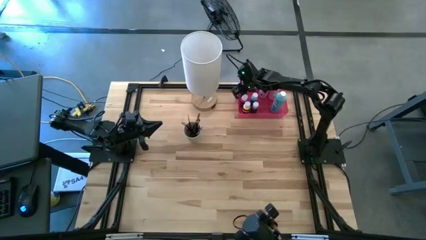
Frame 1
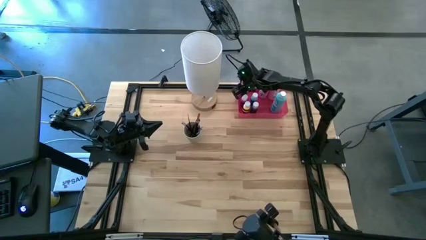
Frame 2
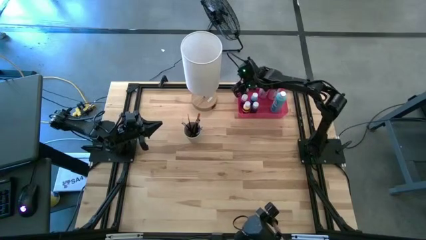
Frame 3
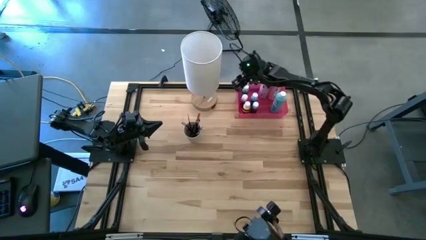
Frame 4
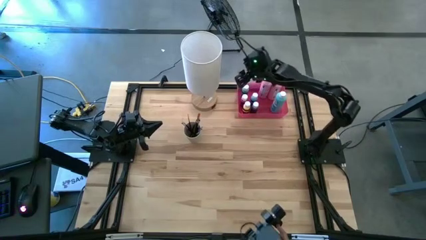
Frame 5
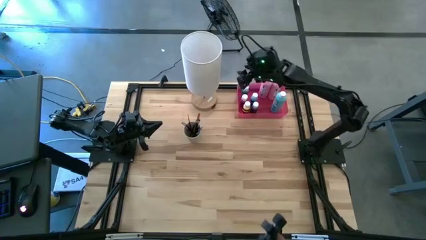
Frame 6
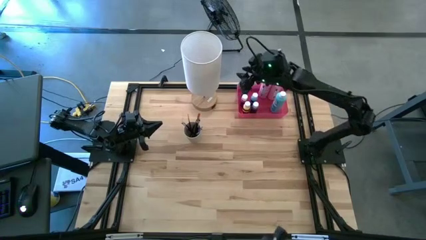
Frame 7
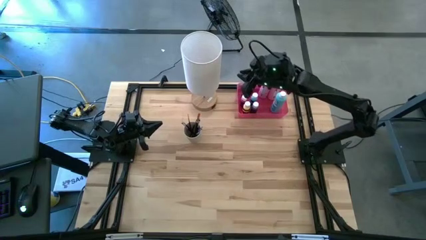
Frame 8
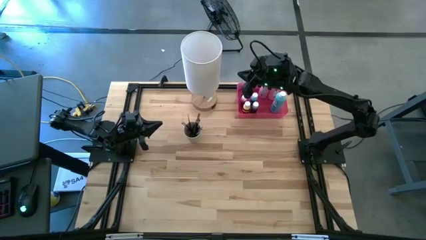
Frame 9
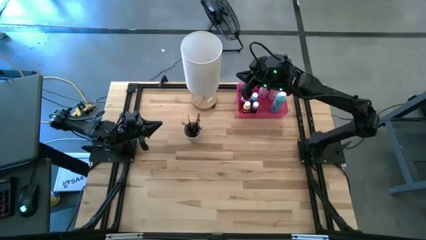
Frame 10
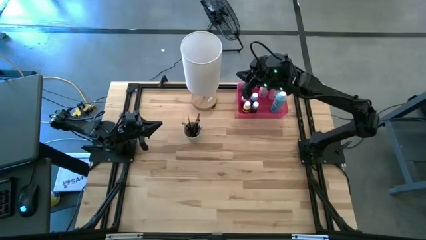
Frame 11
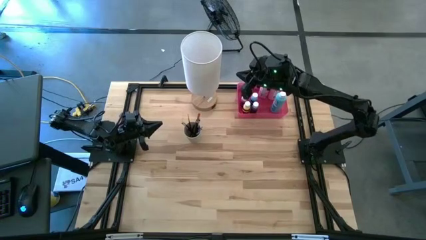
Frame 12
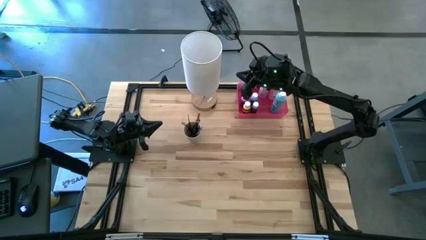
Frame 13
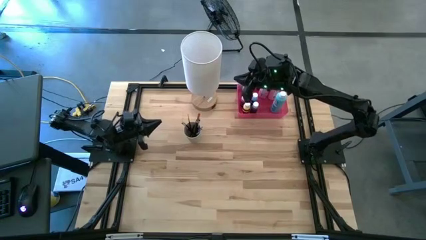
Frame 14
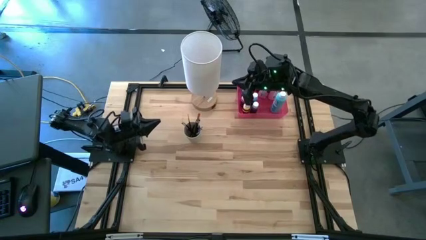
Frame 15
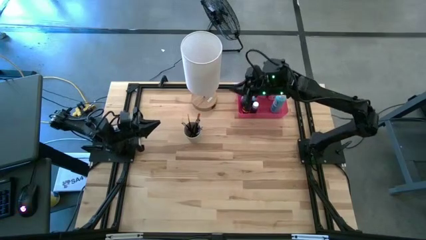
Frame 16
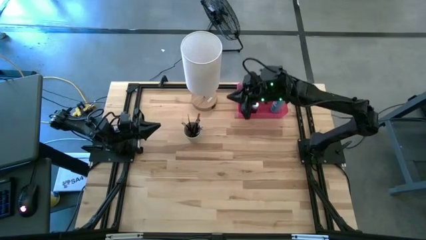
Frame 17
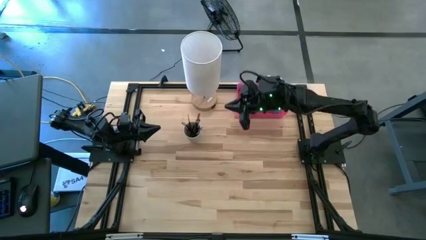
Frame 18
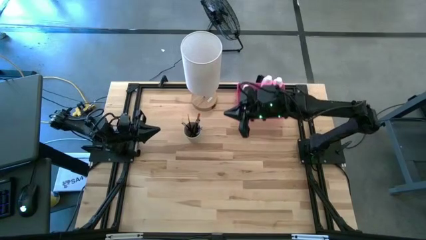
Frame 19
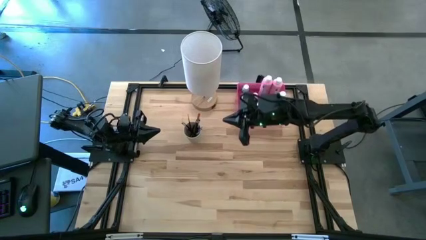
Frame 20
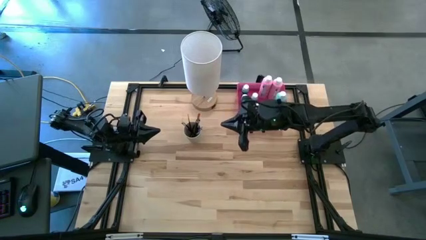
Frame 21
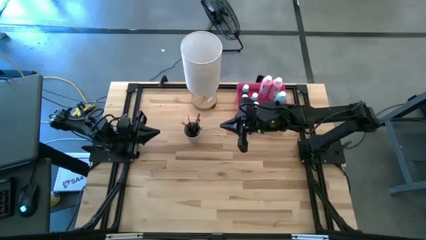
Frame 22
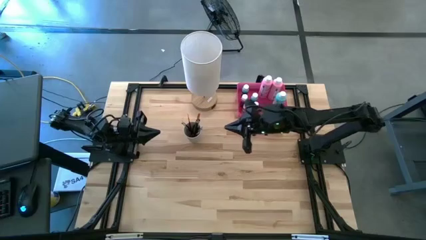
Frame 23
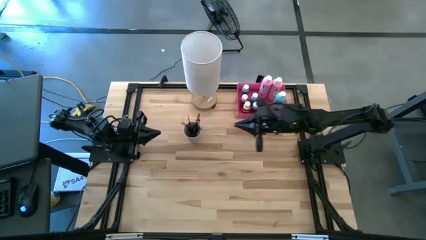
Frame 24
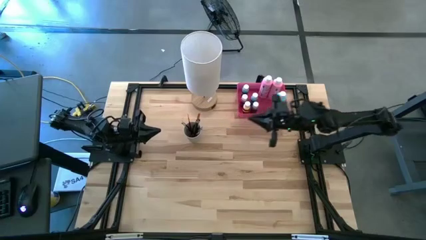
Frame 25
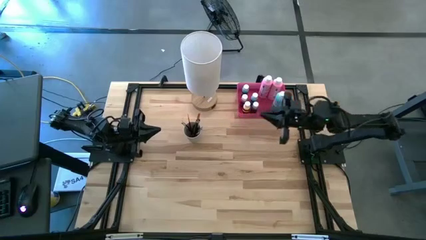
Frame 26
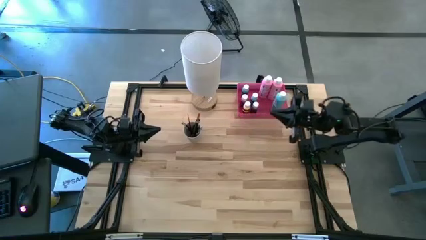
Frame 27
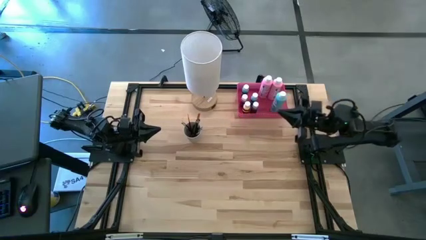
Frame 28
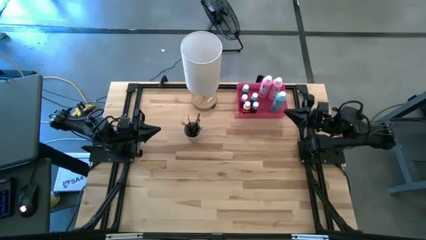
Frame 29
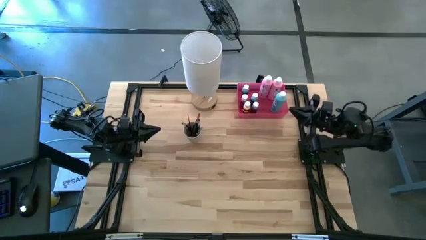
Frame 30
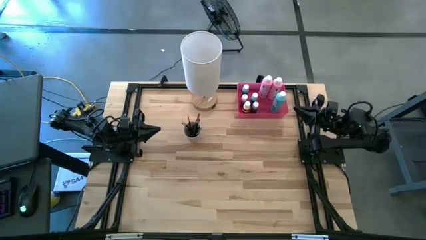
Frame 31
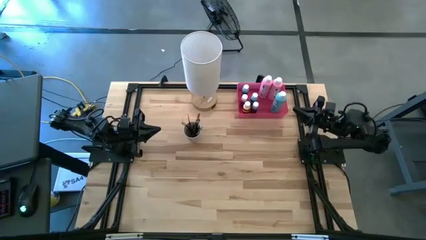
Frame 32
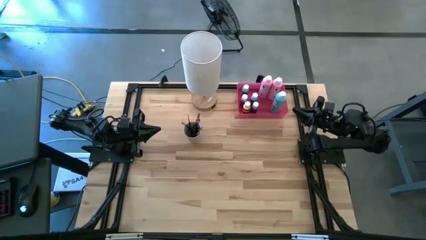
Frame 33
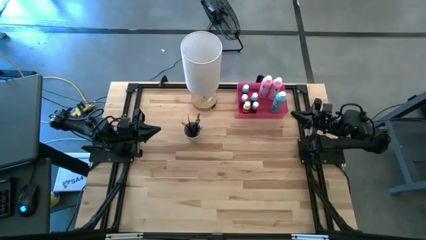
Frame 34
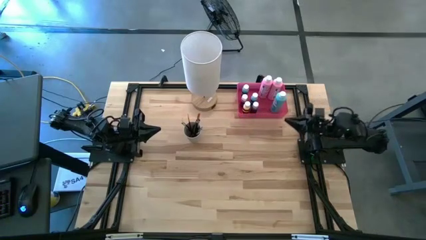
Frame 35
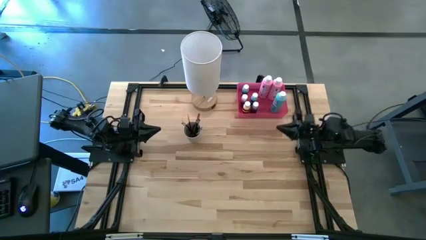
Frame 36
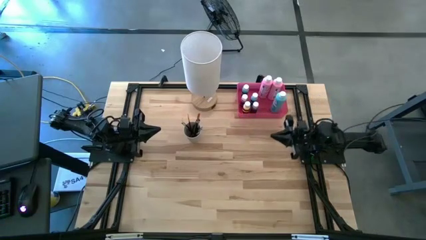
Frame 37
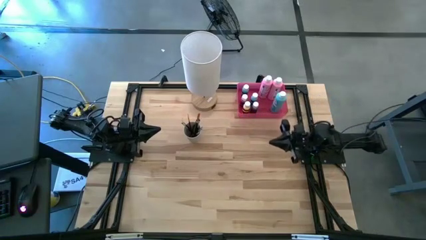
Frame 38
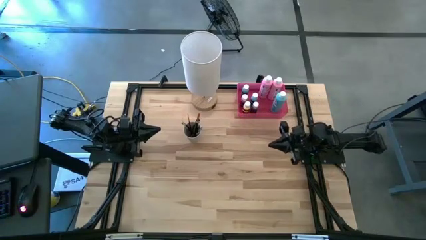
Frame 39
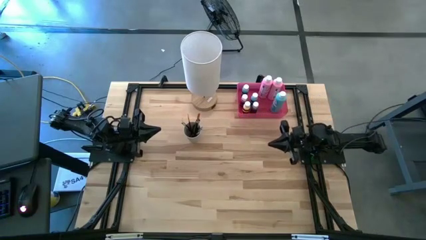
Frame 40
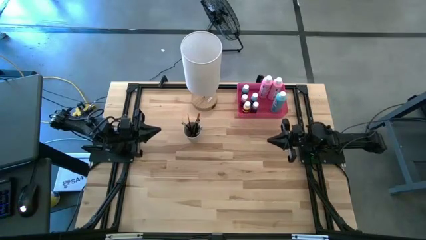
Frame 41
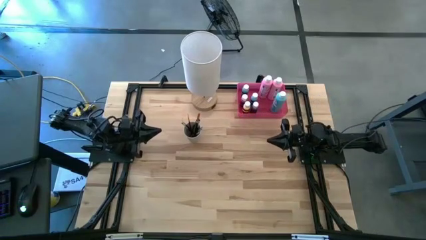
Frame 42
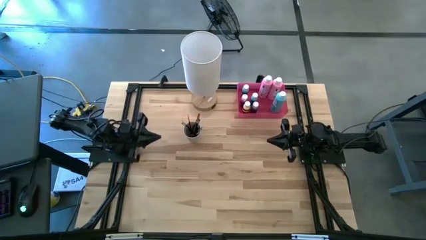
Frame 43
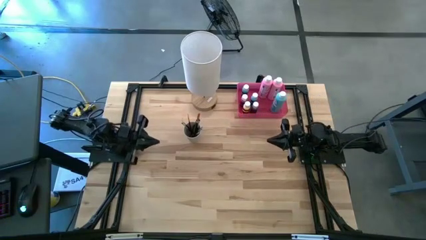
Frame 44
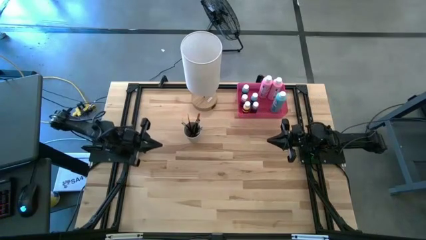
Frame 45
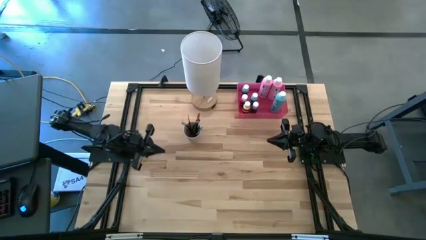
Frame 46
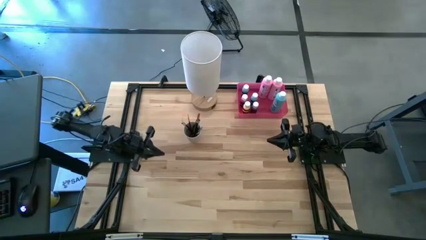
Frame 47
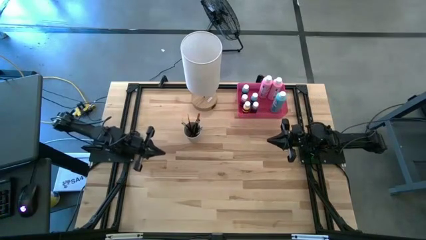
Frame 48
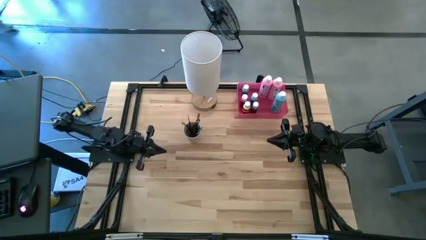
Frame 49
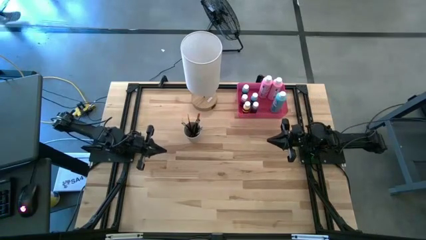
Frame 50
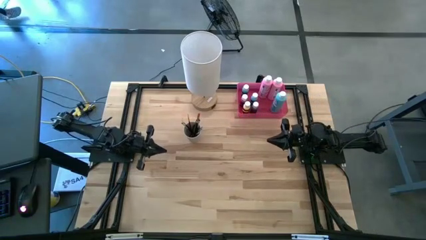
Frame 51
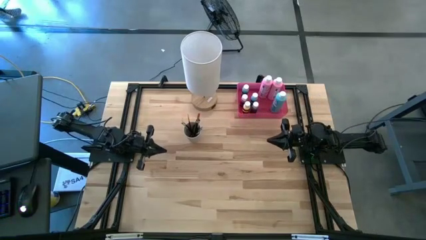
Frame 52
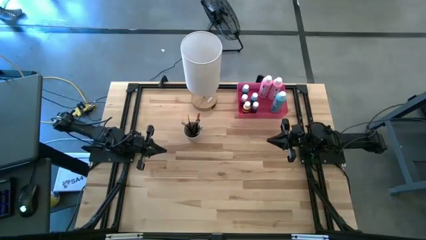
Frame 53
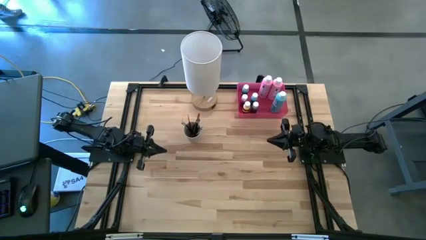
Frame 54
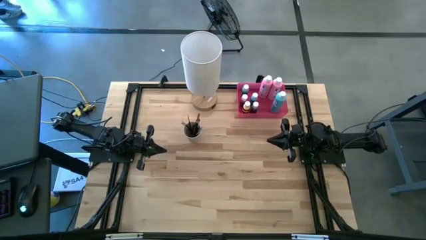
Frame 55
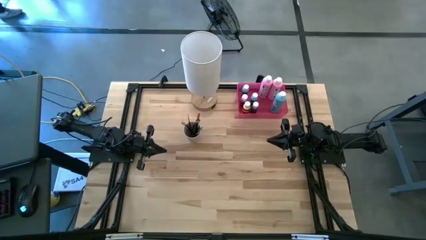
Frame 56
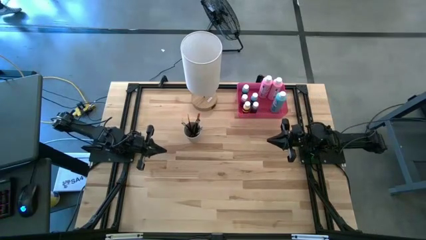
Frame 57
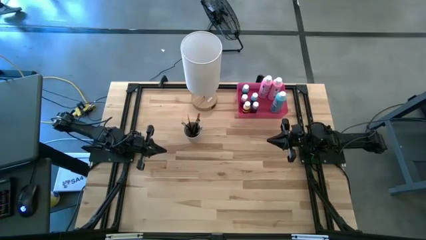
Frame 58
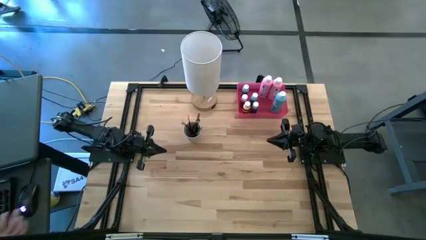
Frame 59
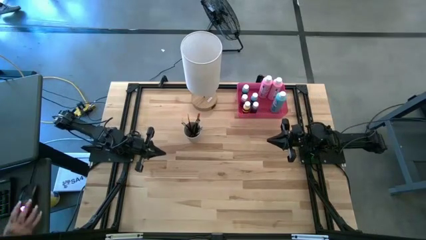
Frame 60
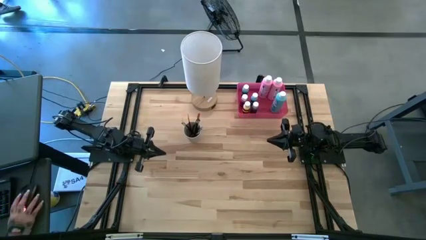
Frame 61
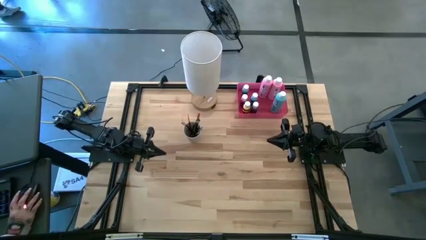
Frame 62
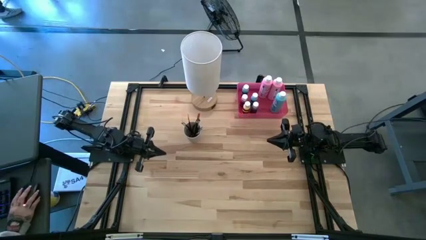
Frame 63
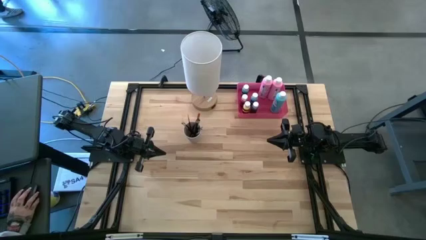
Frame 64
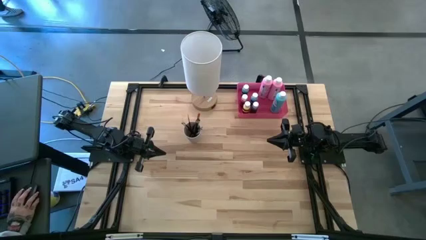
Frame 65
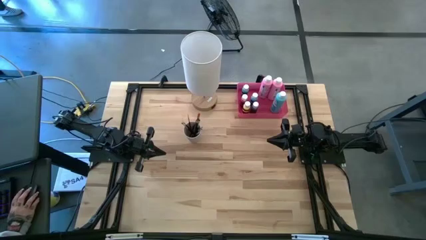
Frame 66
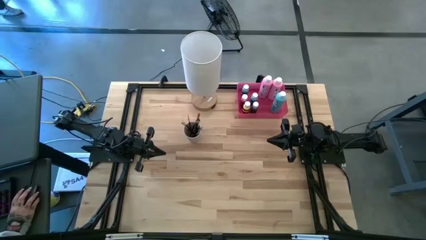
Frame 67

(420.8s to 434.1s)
Task: Pick & Place Paint Supplies
Return to Home Position
